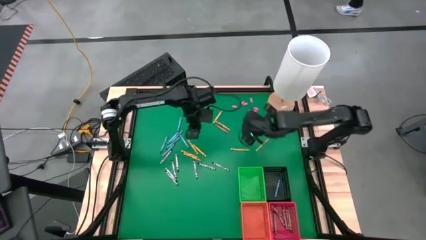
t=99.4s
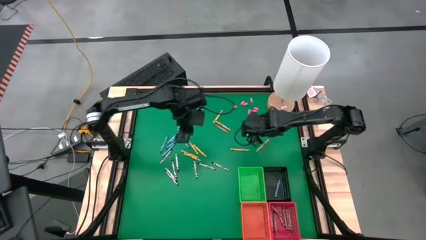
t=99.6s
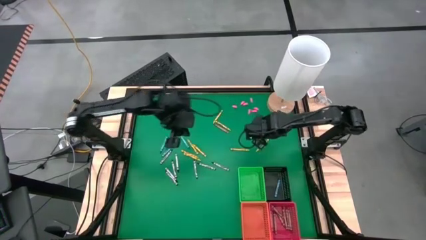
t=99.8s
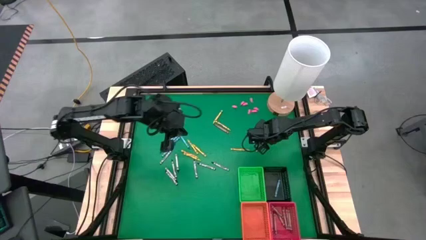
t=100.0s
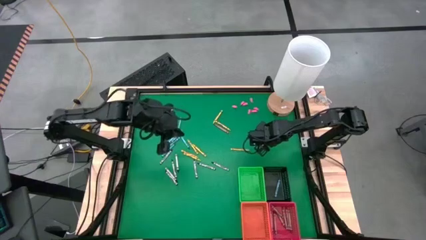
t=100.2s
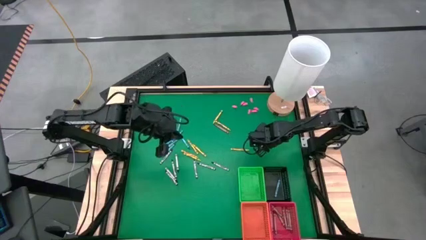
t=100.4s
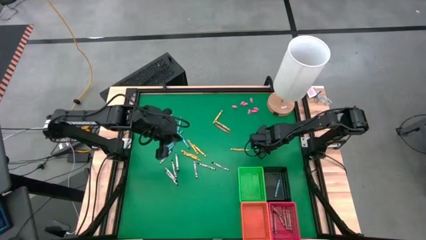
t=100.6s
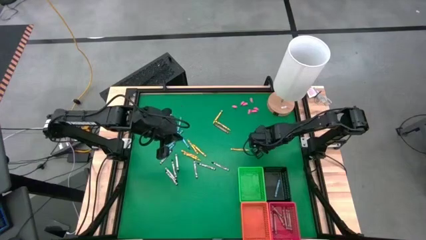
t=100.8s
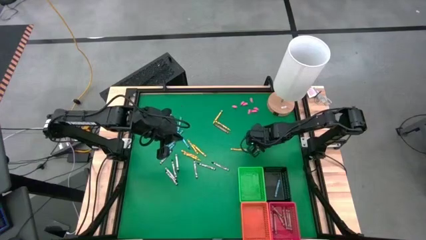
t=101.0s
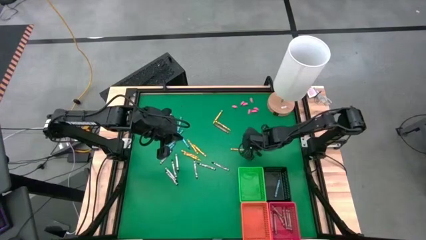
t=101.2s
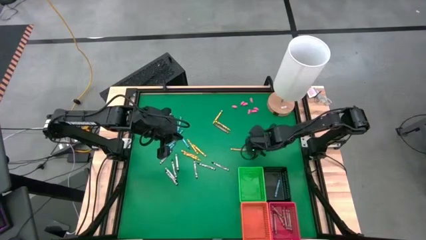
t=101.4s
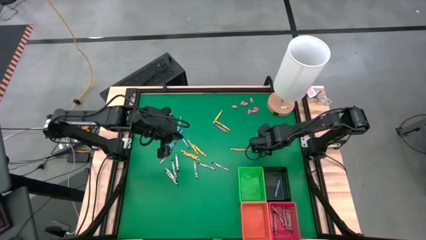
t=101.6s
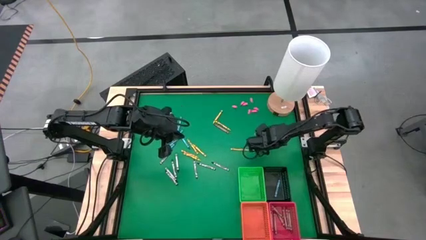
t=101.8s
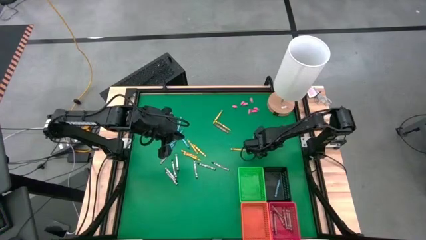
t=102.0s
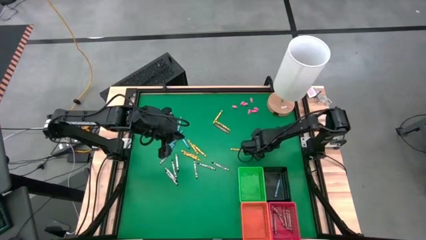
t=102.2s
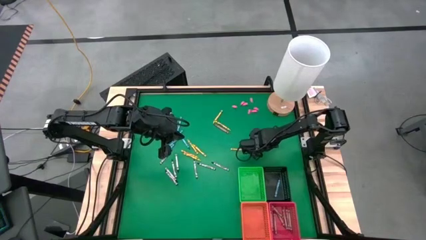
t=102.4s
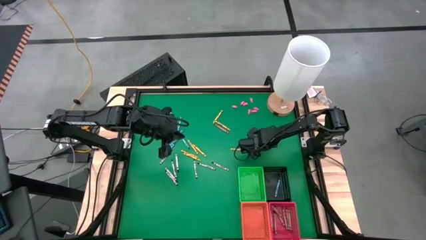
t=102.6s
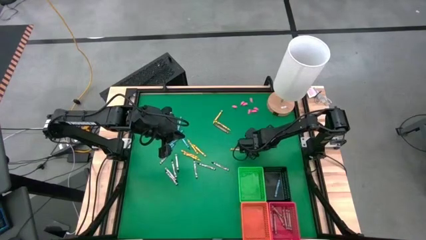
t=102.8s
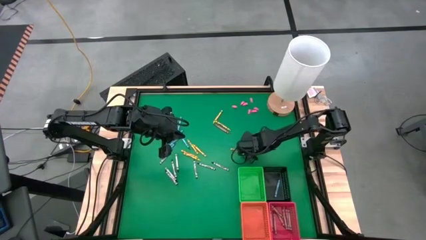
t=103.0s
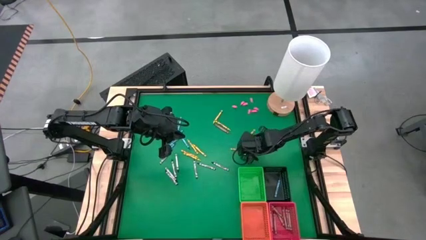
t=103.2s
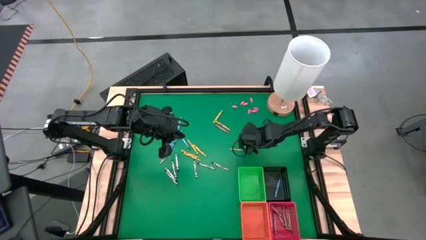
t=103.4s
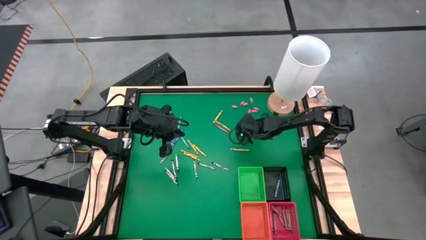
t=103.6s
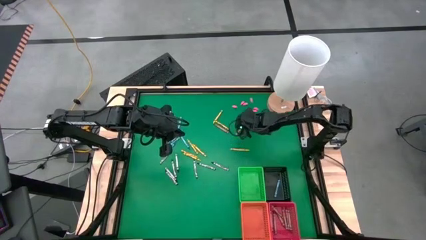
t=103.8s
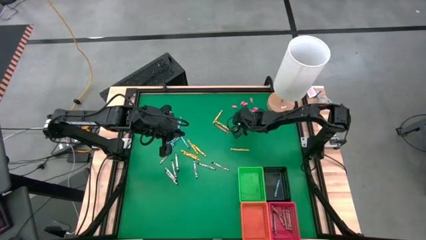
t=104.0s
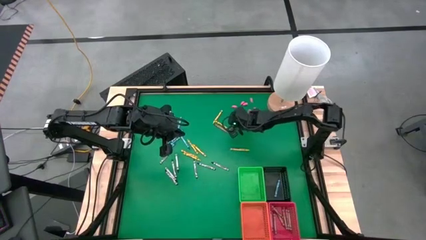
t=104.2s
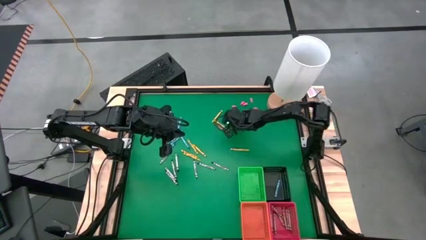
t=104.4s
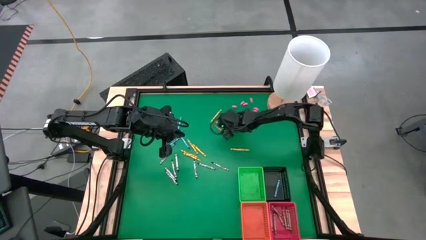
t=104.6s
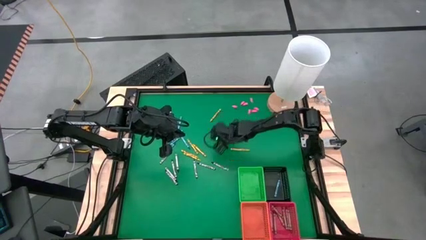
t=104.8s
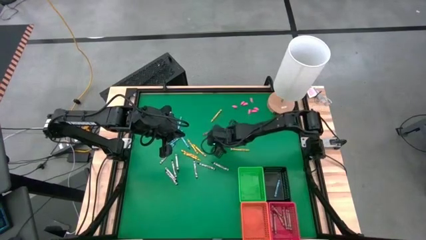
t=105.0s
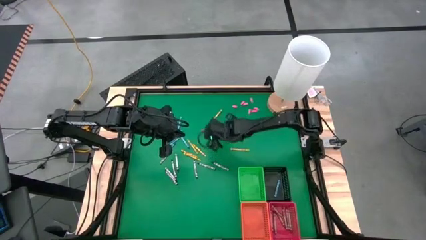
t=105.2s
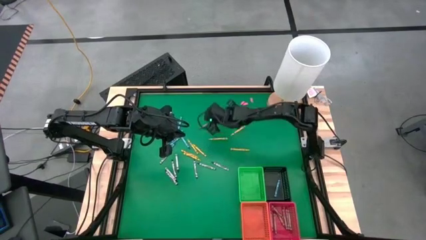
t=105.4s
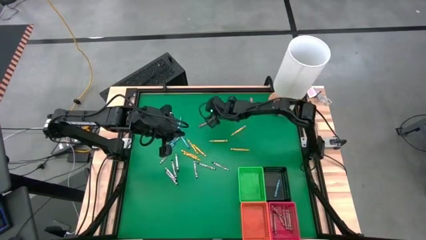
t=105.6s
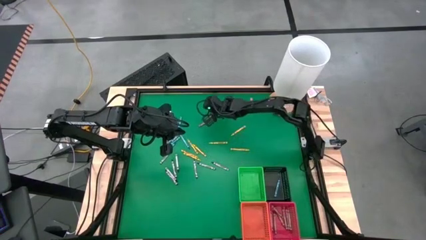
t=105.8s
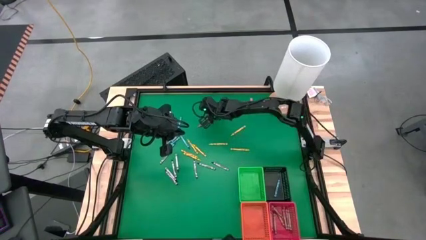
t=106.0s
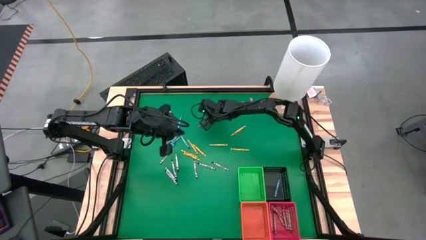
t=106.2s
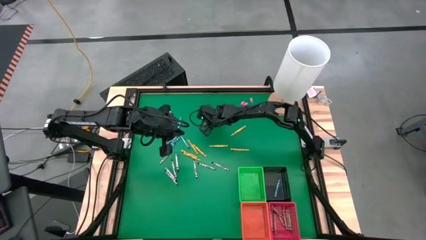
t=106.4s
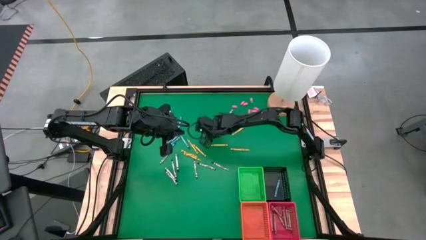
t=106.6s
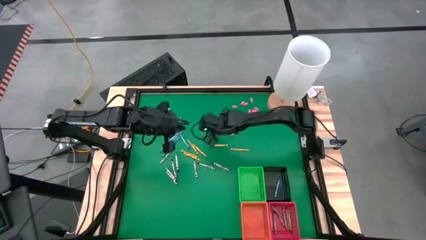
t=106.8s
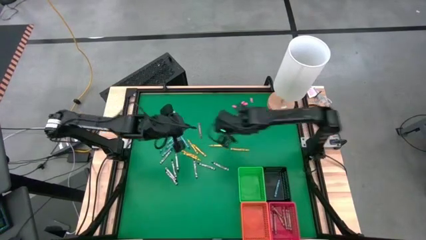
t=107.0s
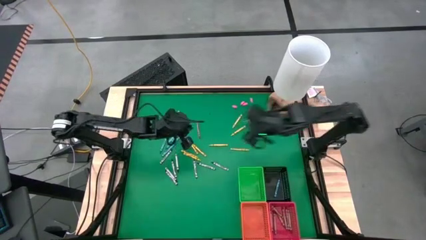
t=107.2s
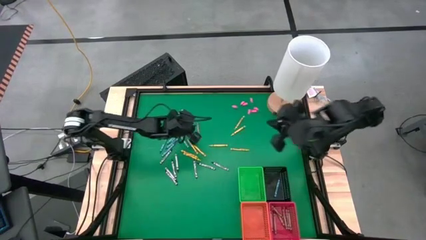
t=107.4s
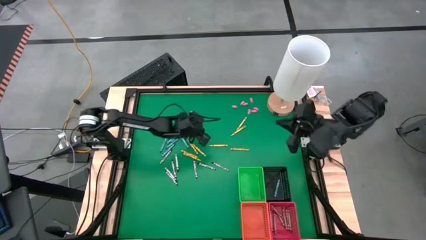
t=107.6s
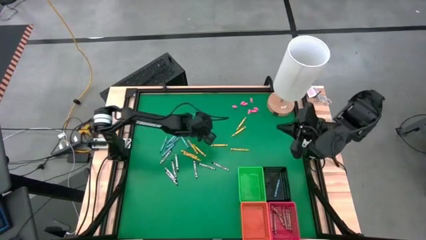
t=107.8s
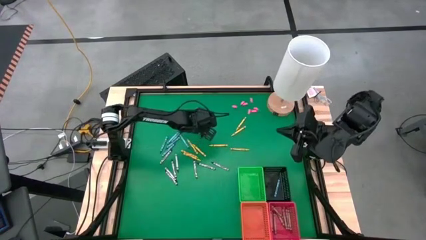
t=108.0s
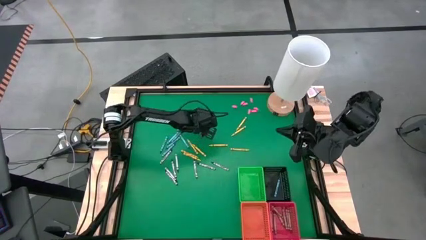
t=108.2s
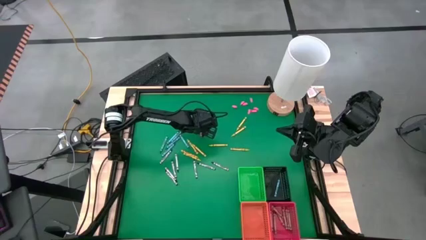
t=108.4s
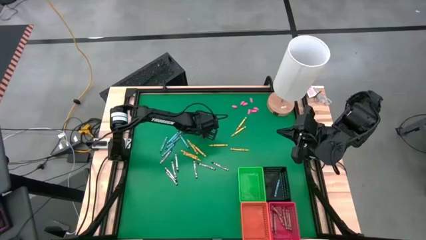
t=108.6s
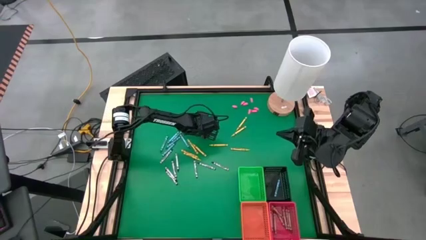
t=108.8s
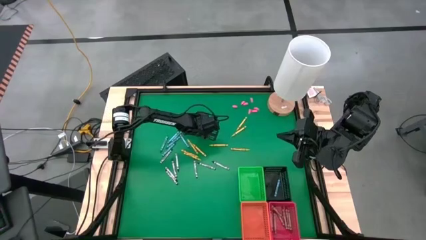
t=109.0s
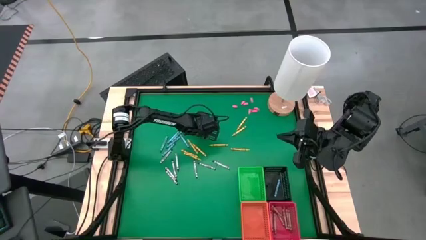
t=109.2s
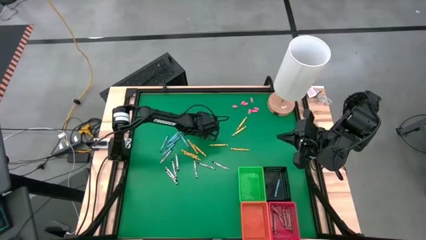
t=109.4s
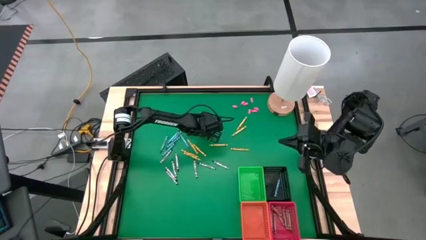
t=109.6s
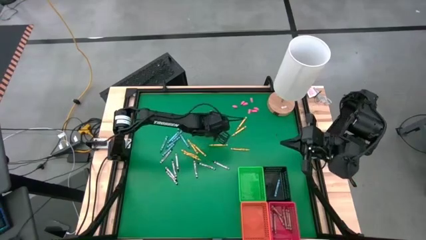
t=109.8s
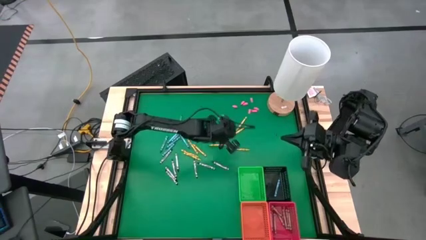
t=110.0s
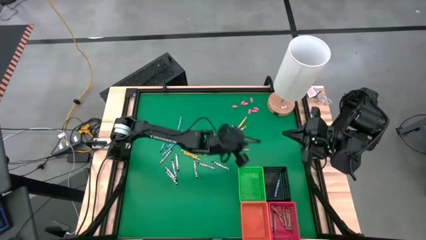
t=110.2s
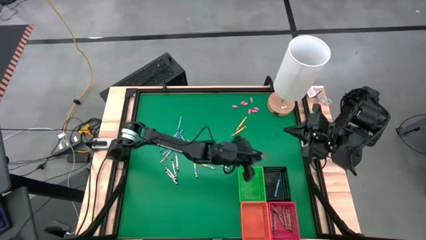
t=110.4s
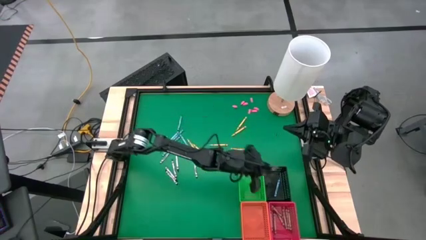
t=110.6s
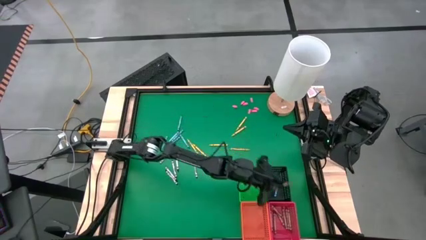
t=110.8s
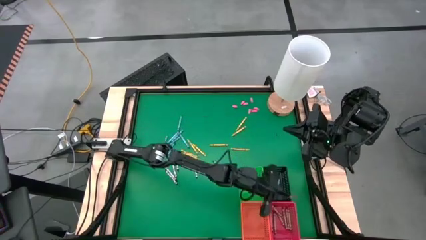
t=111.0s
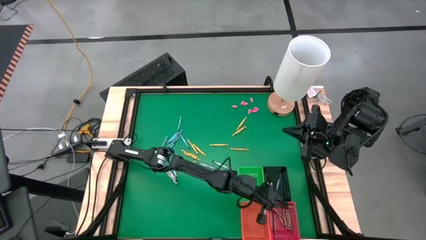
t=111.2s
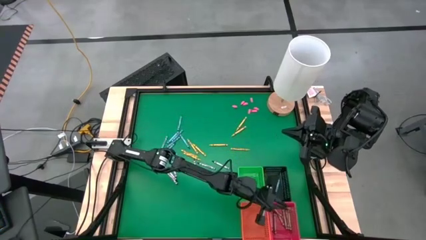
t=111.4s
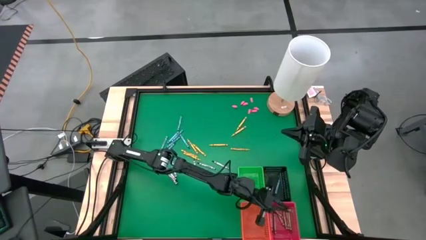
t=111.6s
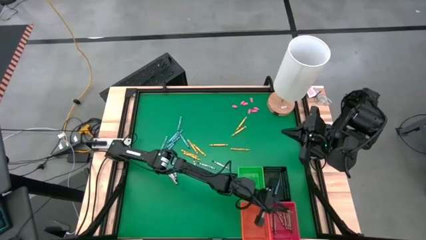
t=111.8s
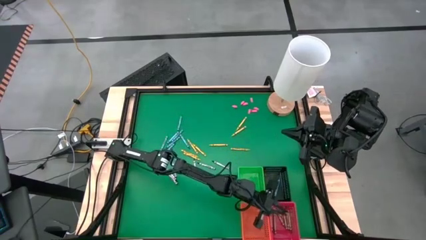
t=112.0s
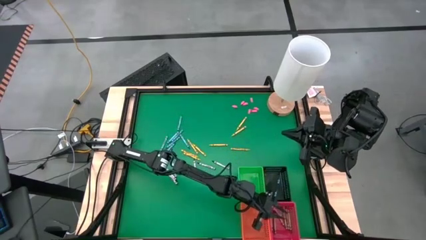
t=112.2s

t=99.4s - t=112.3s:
Task: Sort crayons
Put the brown crayon into the red bin

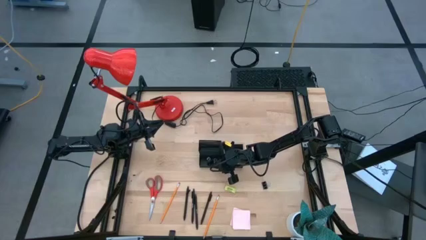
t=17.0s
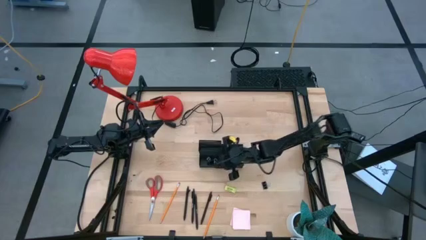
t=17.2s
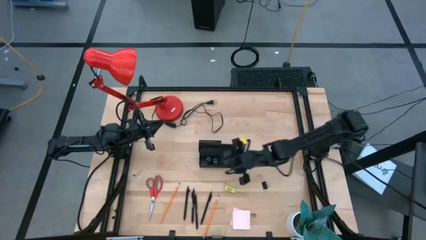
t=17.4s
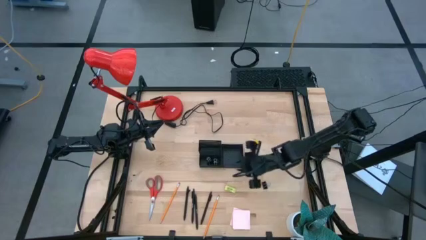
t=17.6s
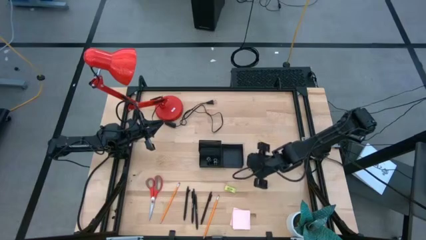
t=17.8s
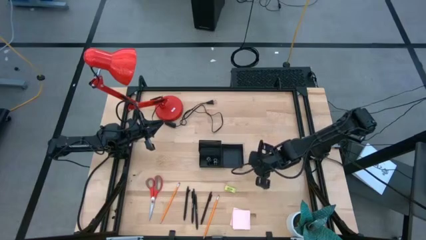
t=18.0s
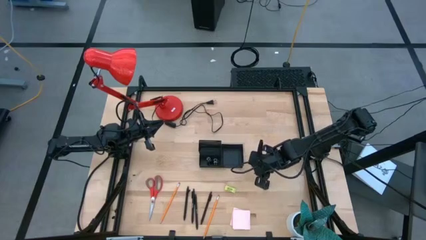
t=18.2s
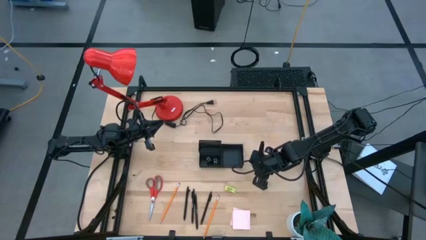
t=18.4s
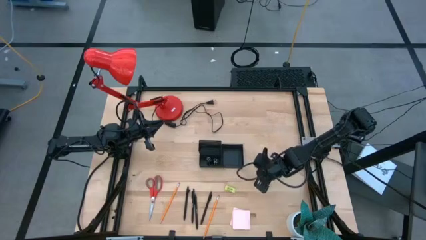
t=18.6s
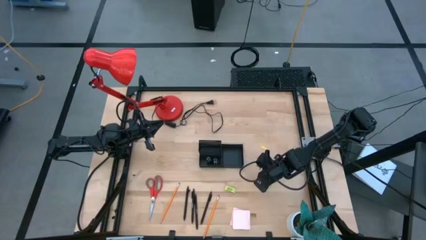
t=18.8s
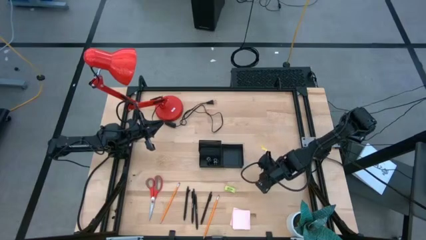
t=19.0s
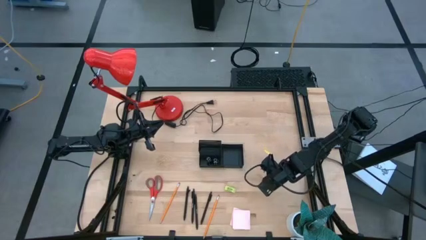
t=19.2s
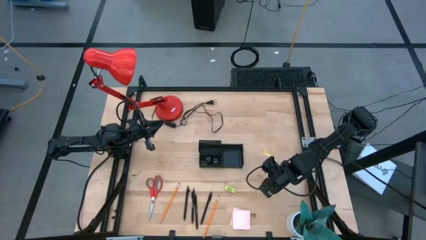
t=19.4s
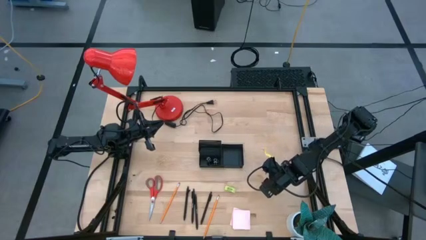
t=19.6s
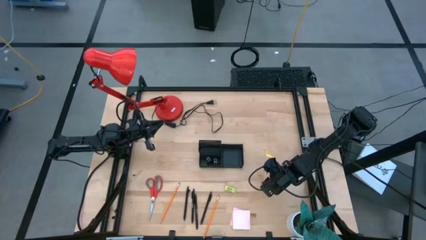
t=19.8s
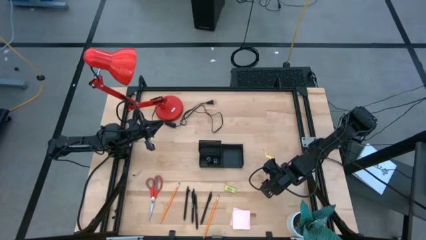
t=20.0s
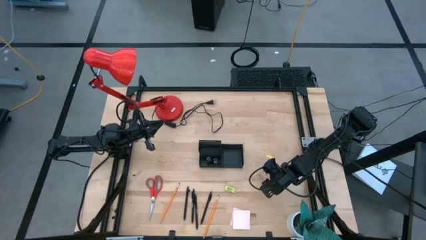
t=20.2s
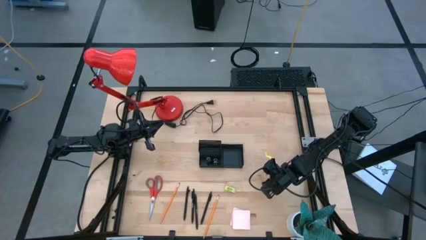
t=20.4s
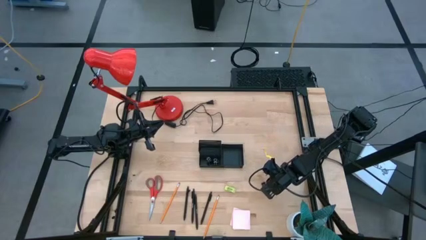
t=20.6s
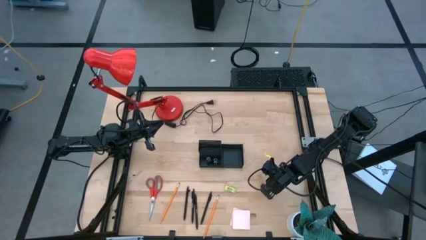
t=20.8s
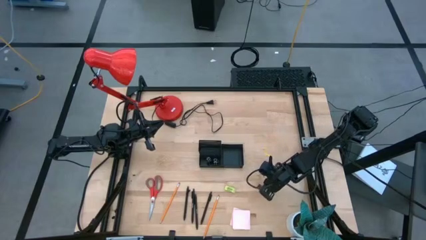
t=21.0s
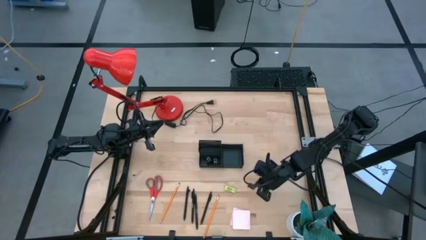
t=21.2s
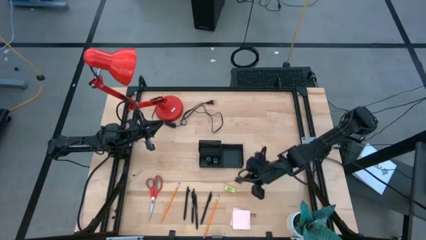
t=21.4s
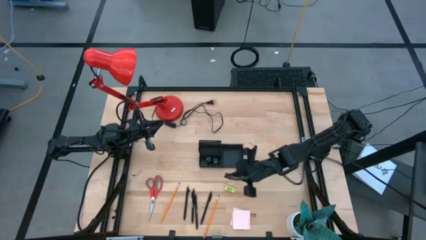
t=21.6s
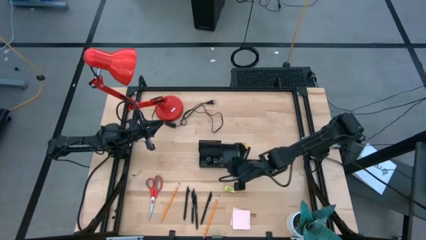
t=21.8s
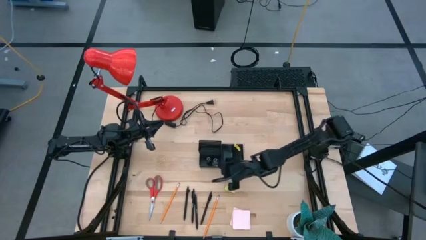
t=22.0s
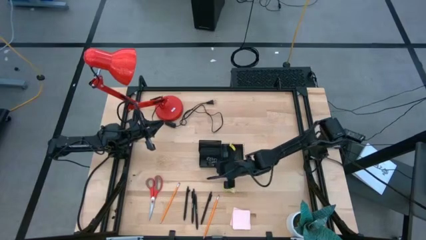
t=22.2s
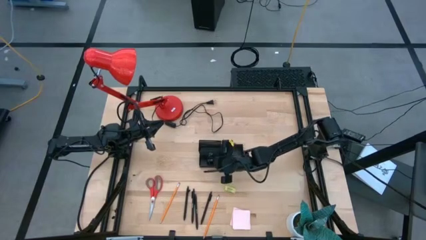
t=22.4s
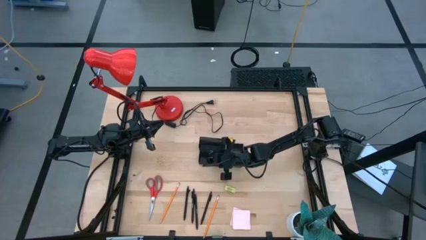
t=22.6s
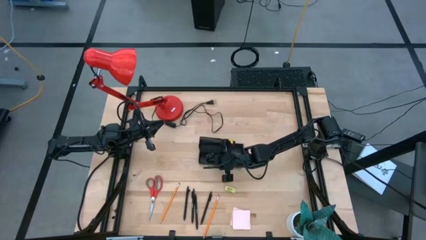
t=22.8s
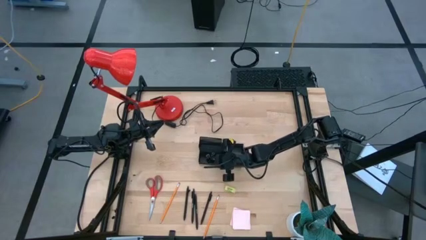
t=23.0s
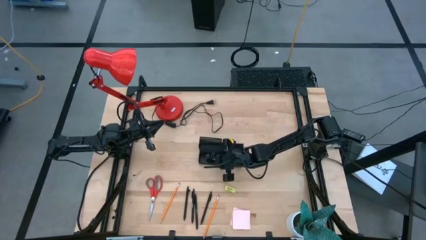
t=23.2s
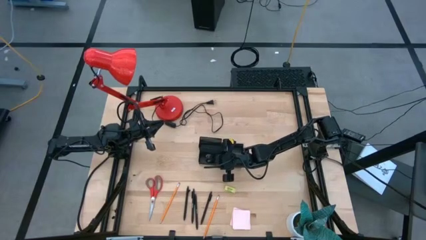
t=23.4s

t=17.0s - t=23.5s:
Task: Pick and place office supplies into organizer
Put the black binder clip into the desk organizer
